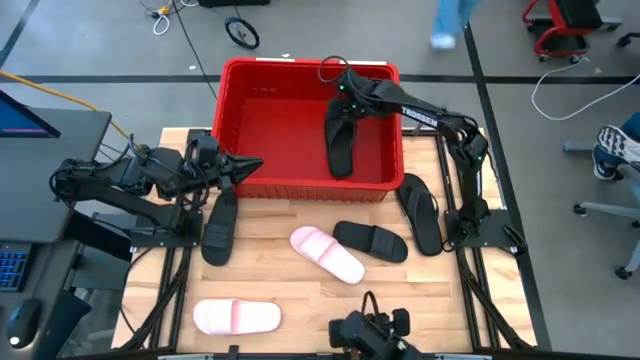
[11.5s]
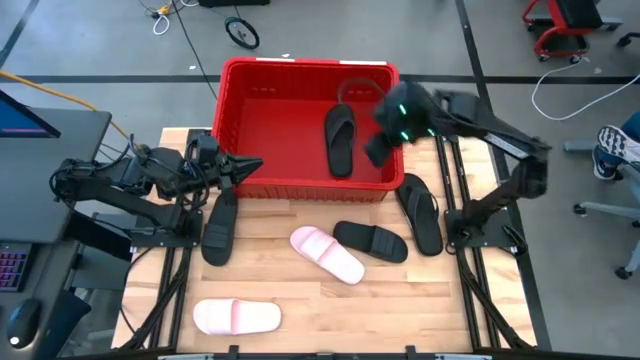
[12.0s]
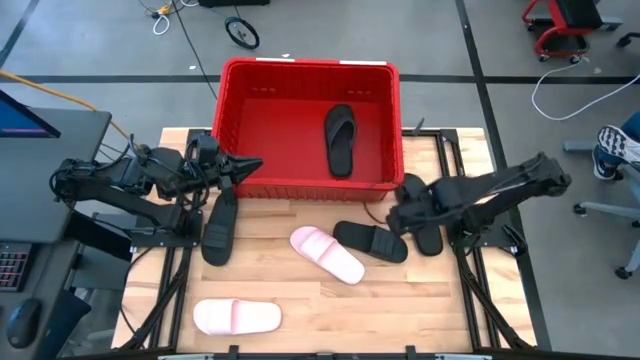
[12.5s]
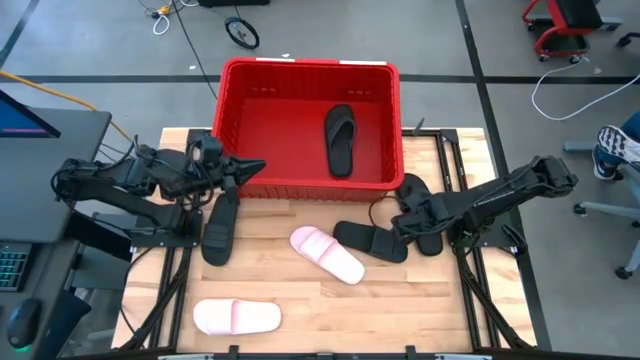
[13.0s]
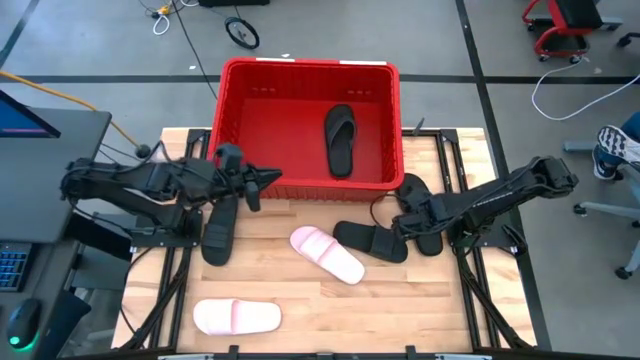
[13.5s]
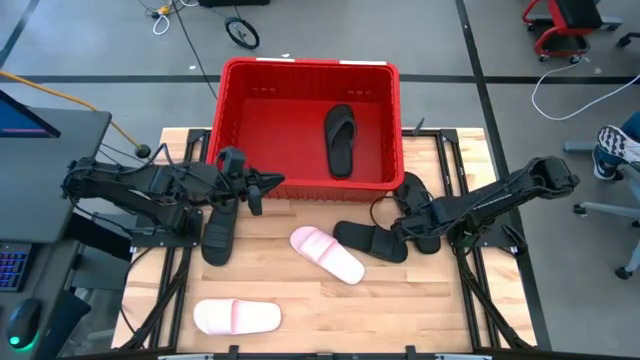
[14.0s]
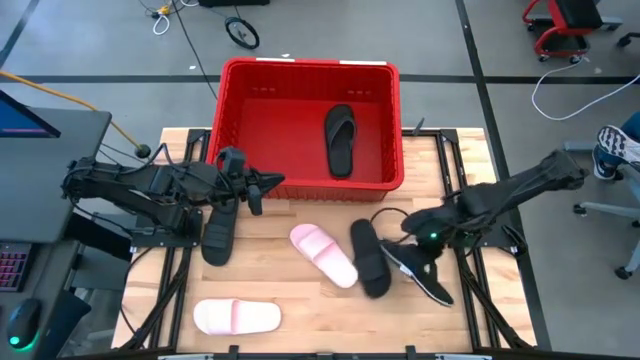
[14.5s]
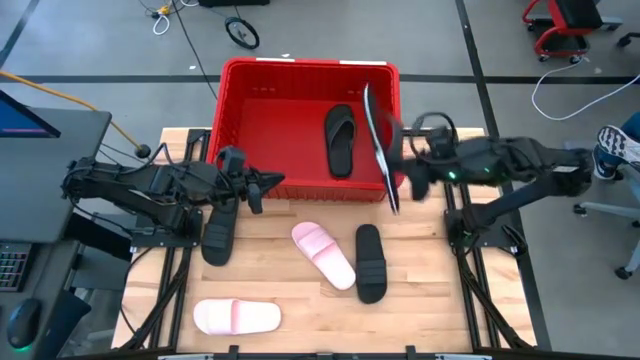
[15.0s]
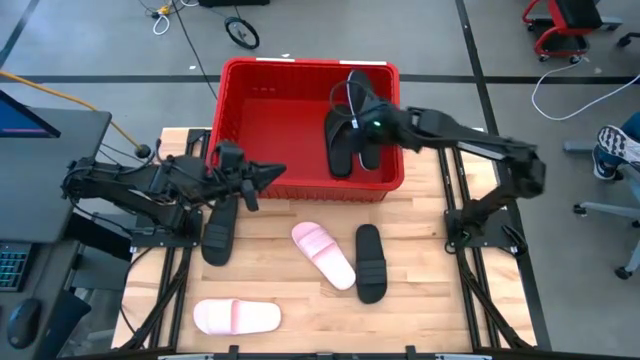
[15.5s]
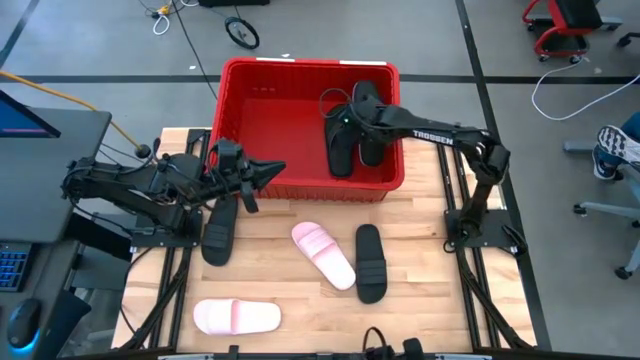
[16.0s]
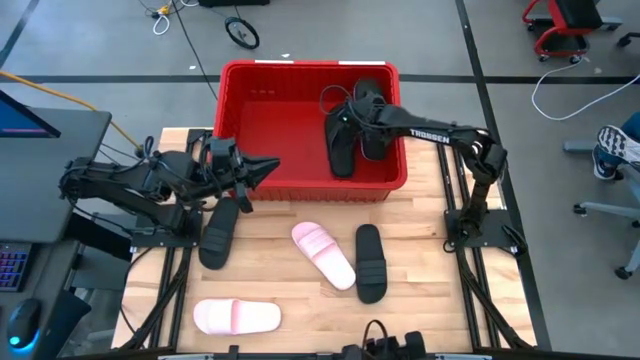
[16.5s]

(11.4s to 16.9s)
Task: Pick and place slides into bin
Put the black slipper into the red bin

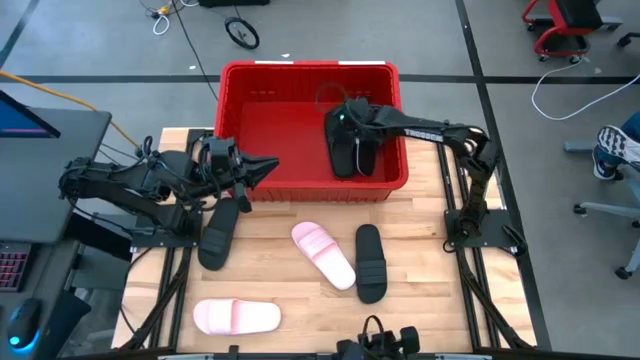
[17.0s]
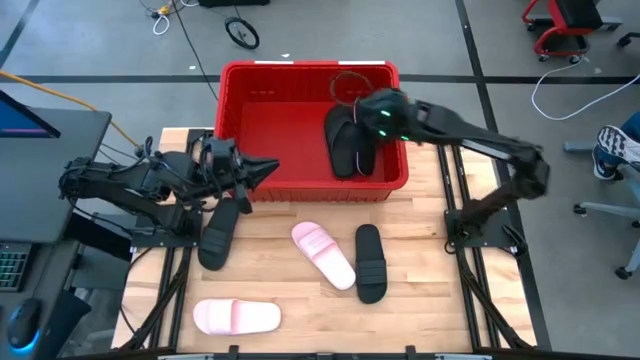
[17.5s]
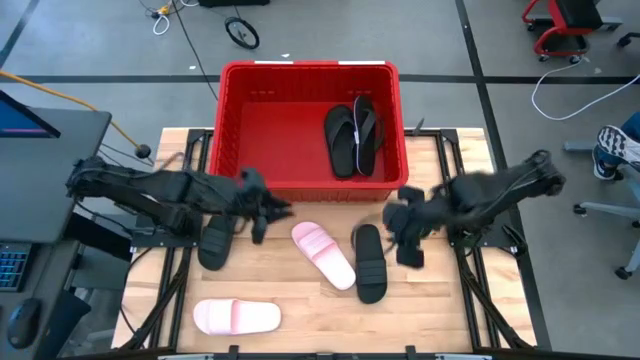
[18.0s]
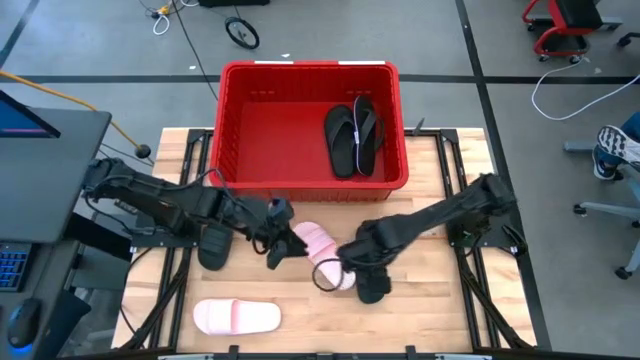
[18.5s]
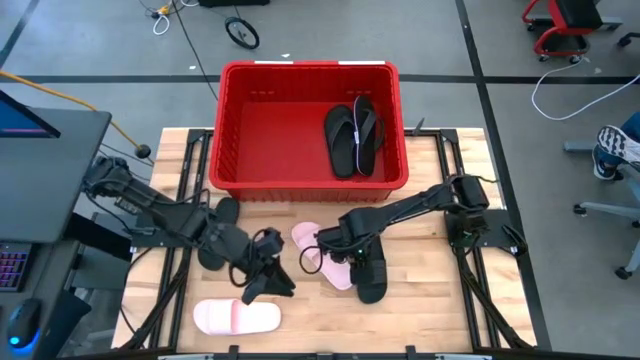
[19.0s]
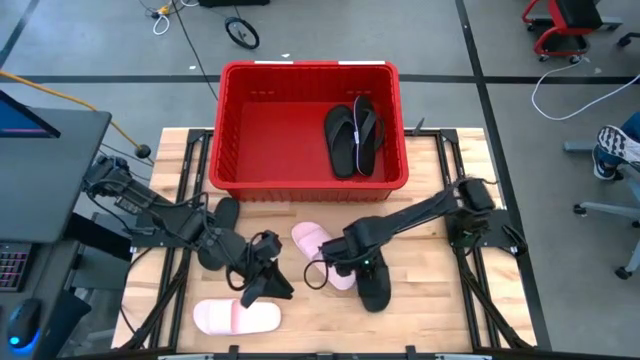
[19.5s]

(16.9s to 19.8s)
Put the right black slide into the red bin

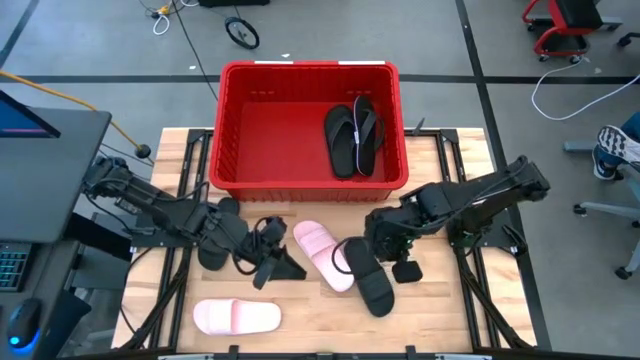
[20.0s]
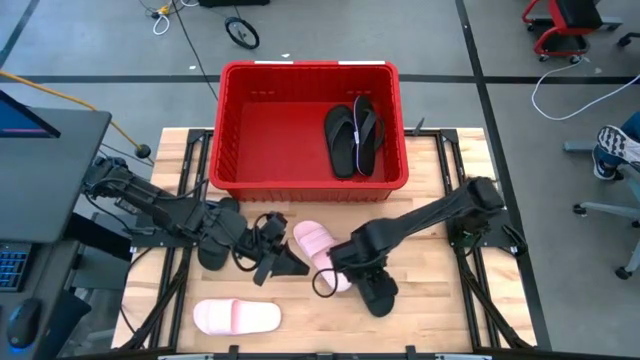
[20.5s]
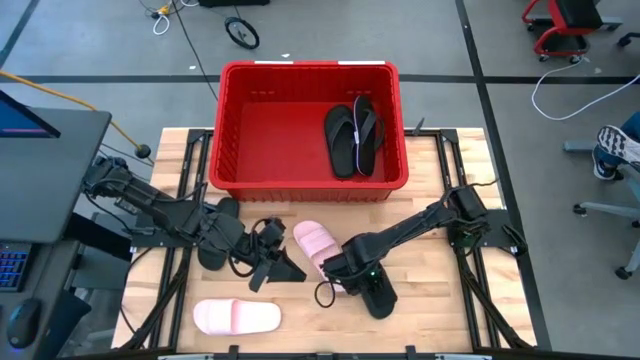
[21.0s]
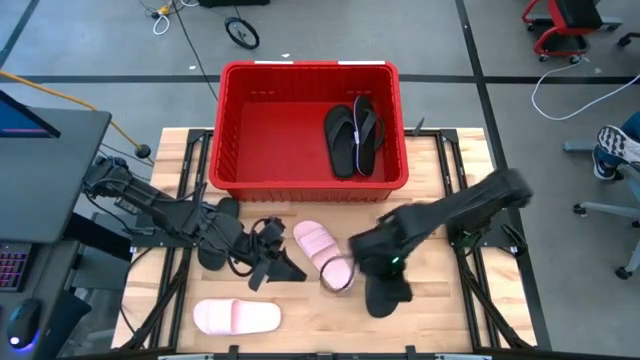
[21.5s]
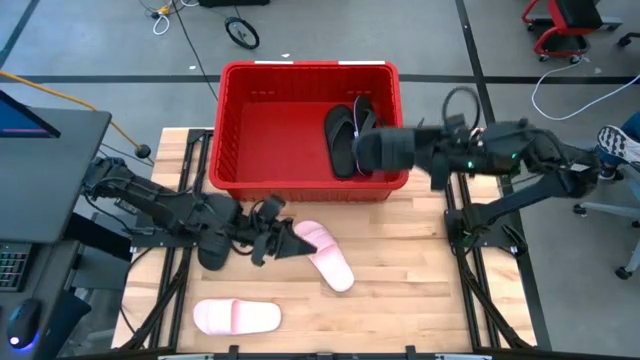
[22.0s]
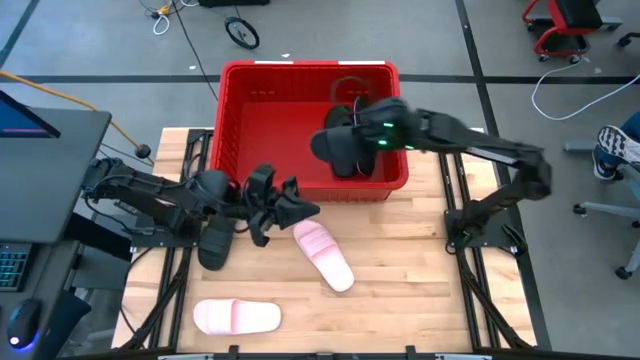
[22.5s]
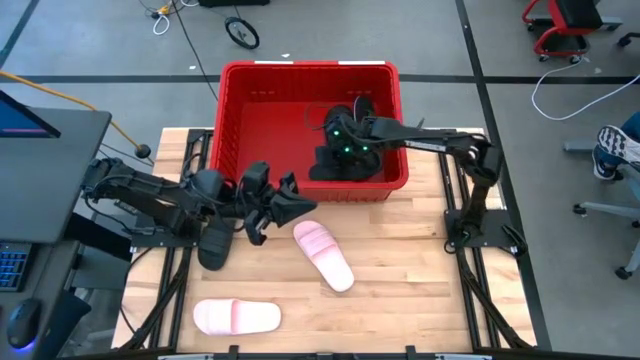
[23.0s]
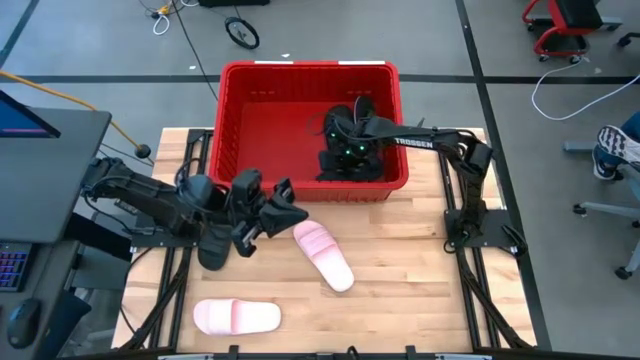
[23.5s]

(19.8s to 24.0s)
Put the right black slide into the red bin

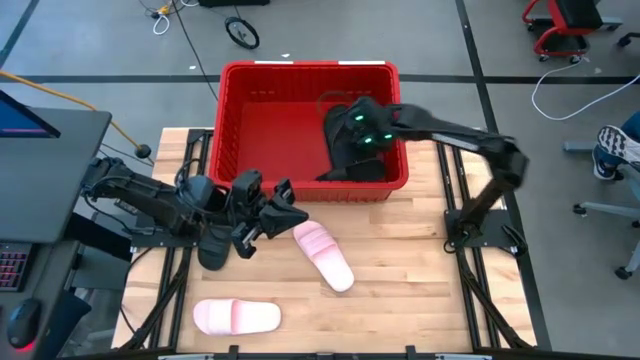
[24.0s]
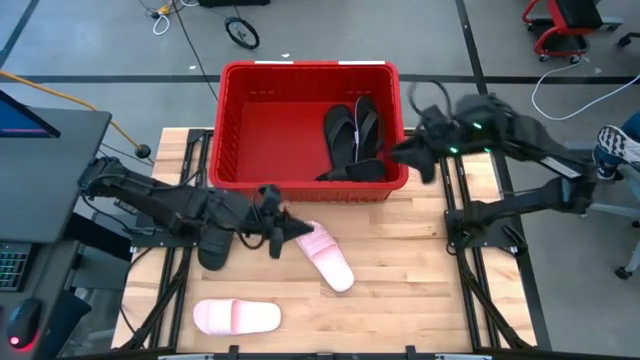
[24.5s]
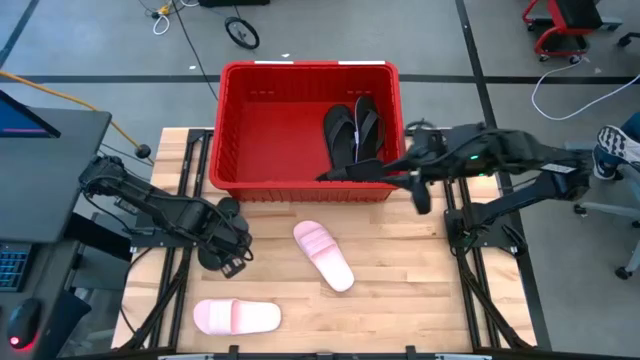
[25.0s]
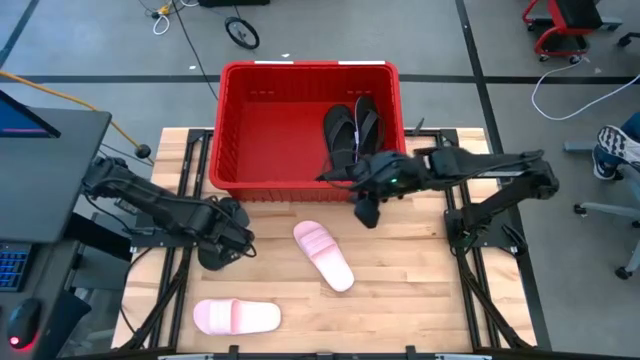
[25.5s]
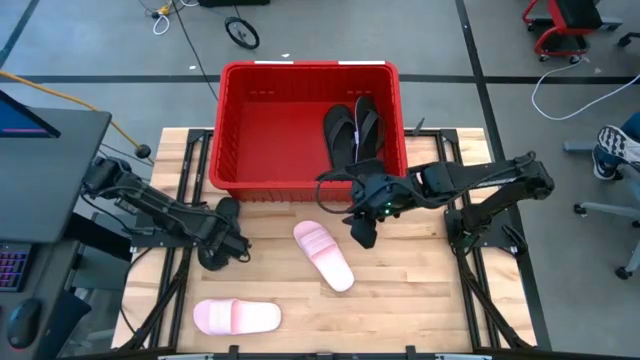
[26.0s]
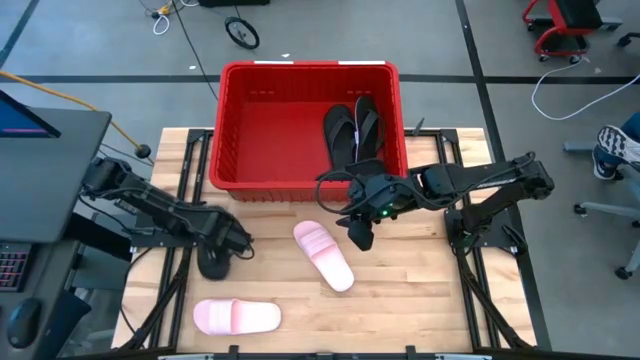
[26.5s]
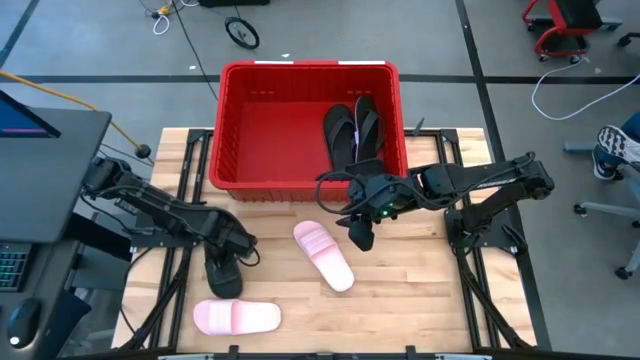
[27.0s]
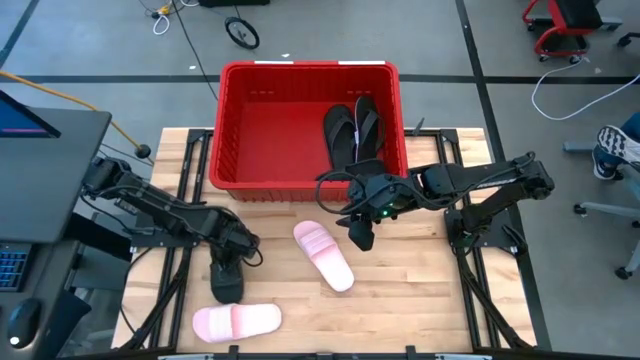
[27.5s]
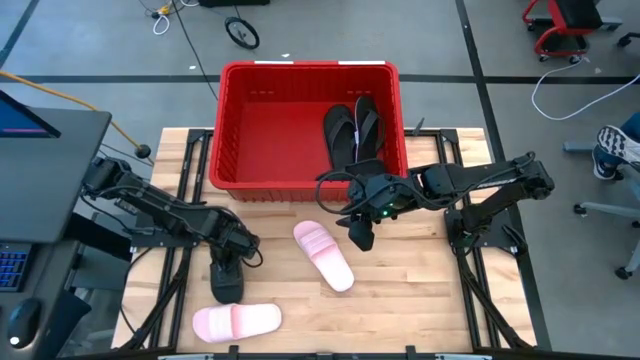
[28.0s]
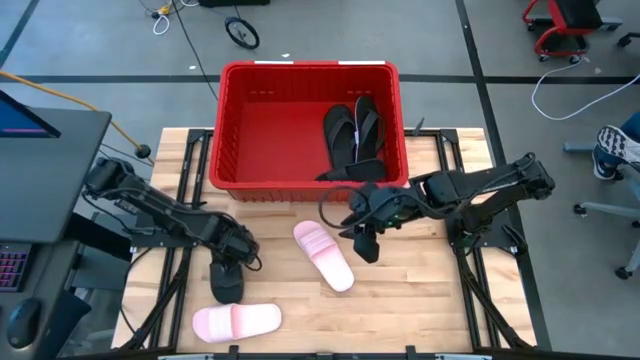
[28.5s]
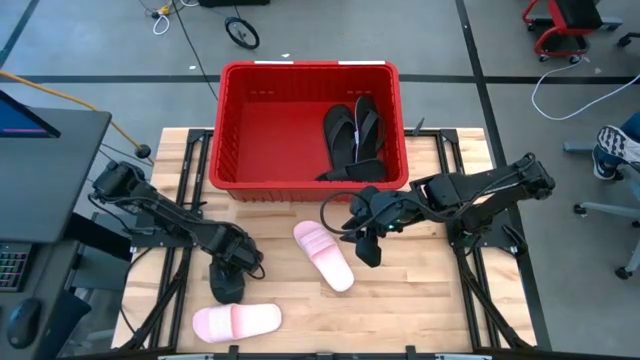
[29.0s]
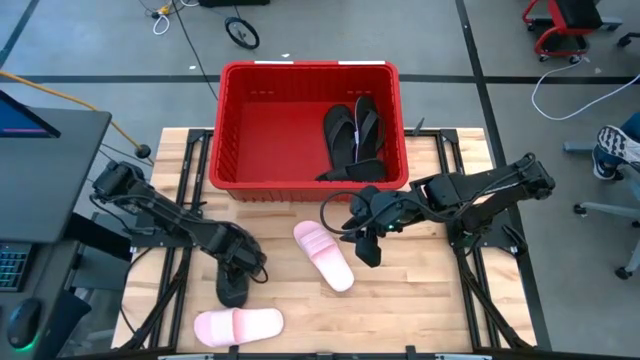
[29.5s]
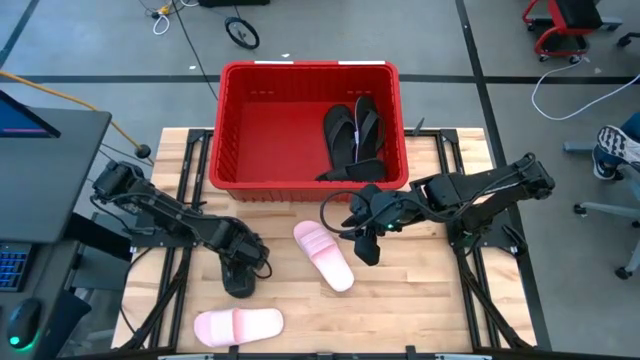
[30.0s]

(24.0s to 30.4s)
Put the black slide into the red bin

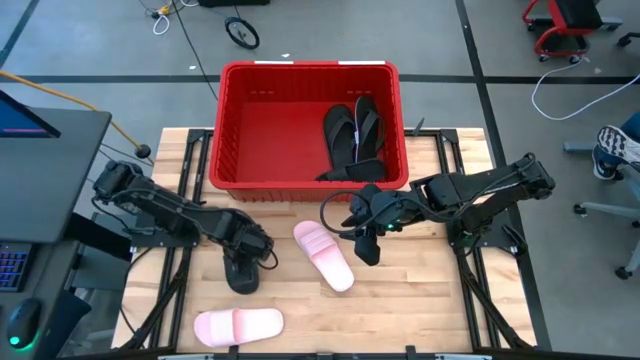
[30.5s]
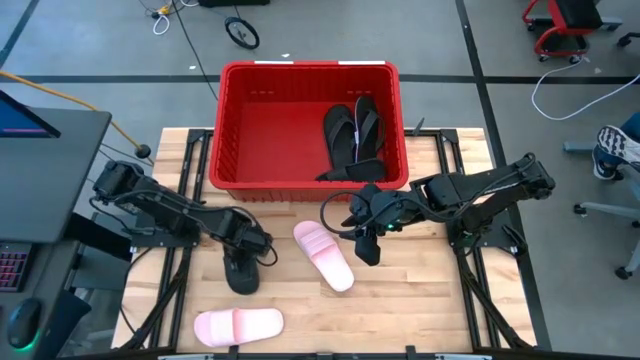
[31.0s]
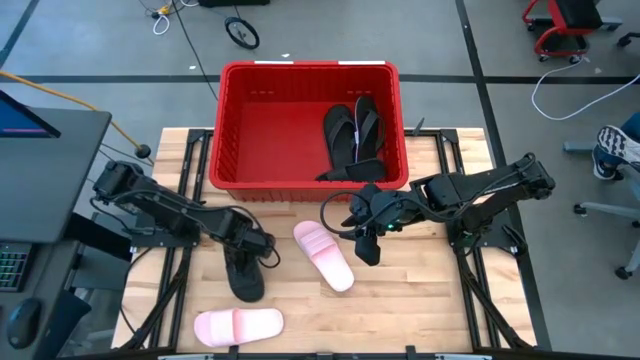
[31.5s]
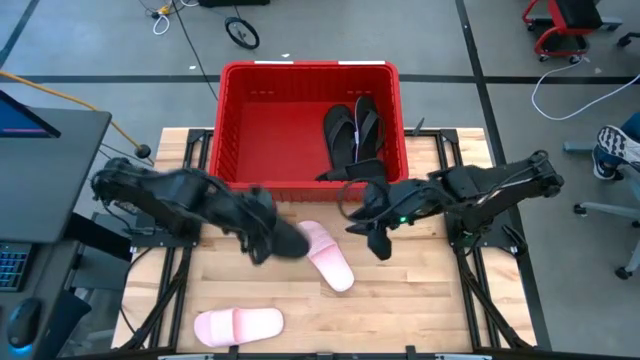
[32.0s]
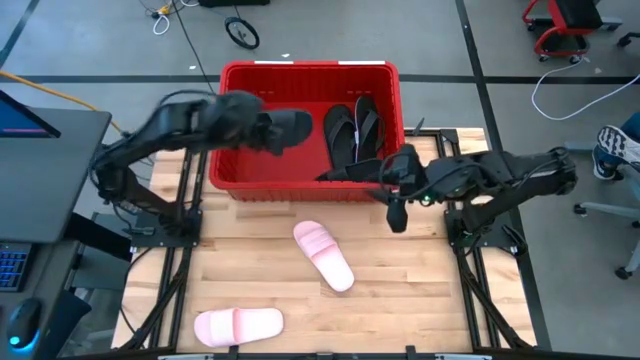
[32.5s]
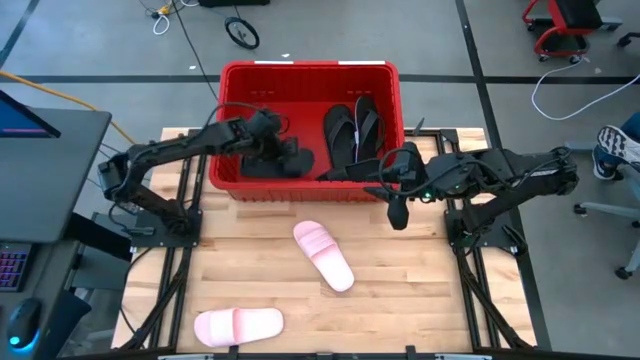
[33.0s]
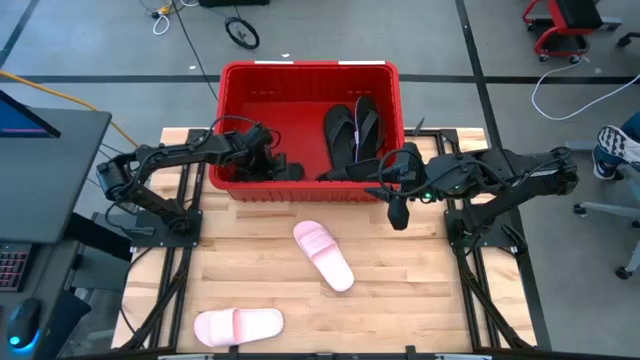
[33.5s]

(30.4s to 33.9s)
Put the black slide into the red bin
